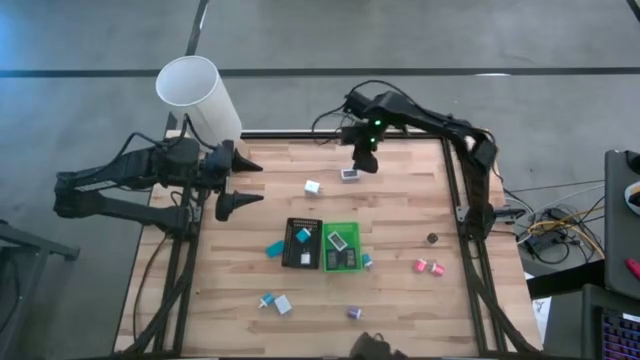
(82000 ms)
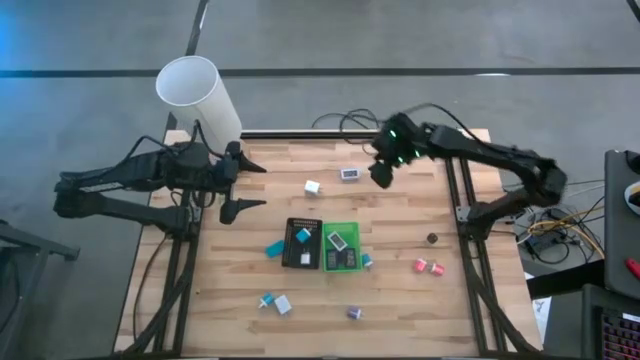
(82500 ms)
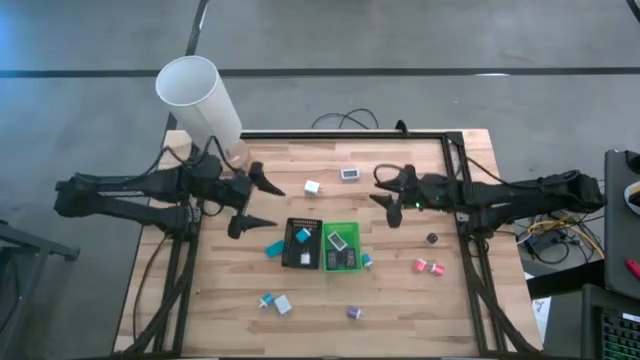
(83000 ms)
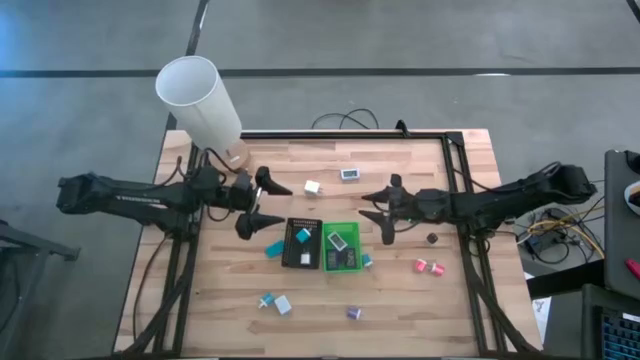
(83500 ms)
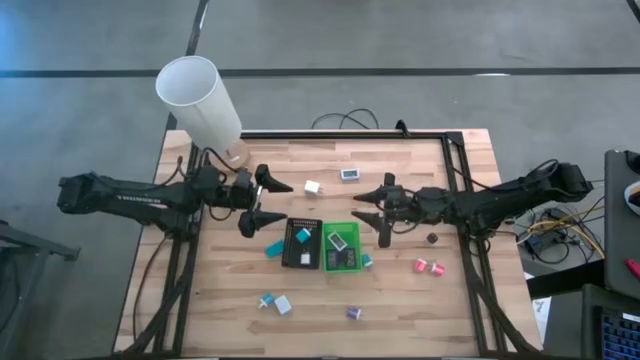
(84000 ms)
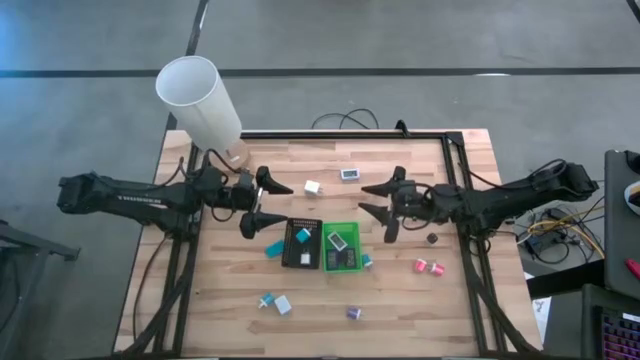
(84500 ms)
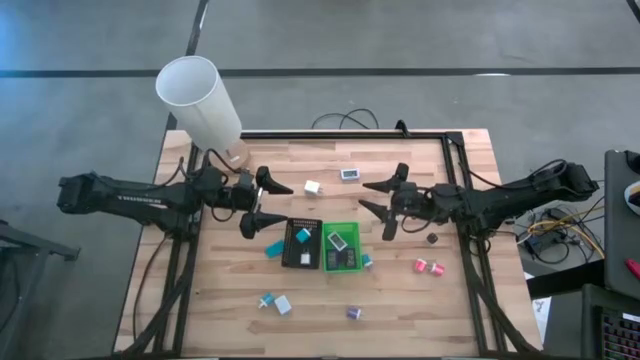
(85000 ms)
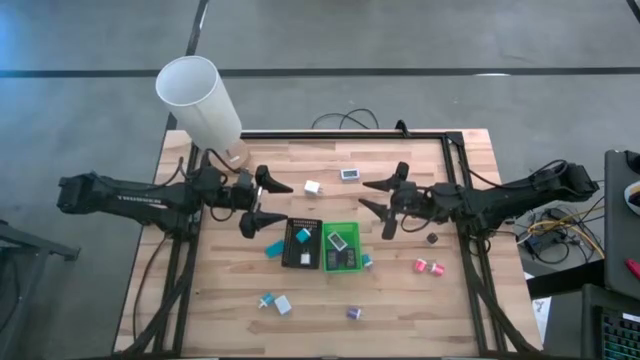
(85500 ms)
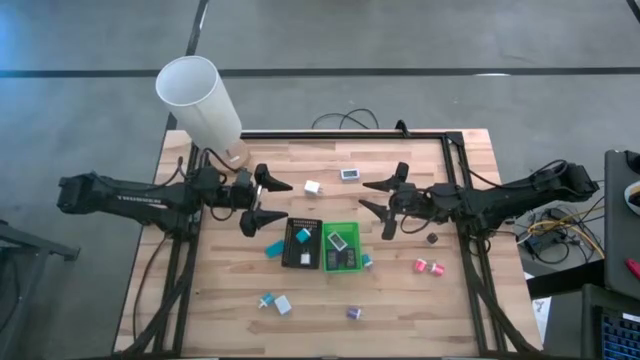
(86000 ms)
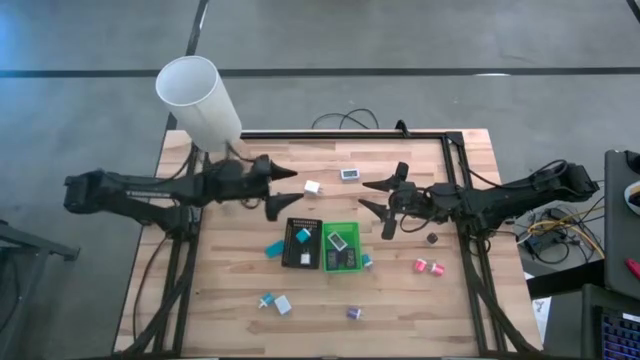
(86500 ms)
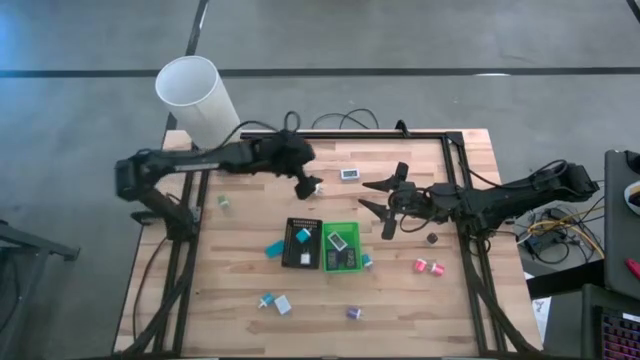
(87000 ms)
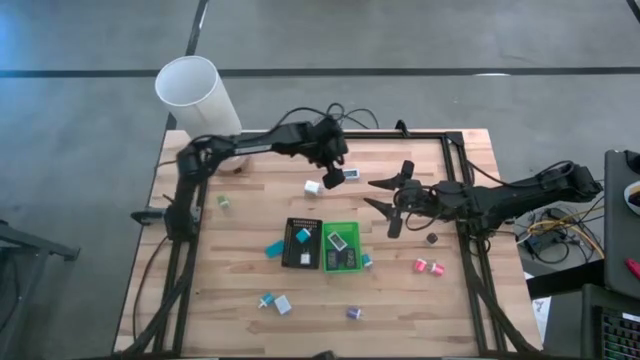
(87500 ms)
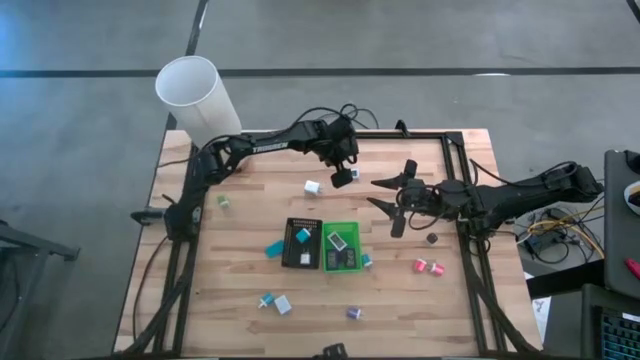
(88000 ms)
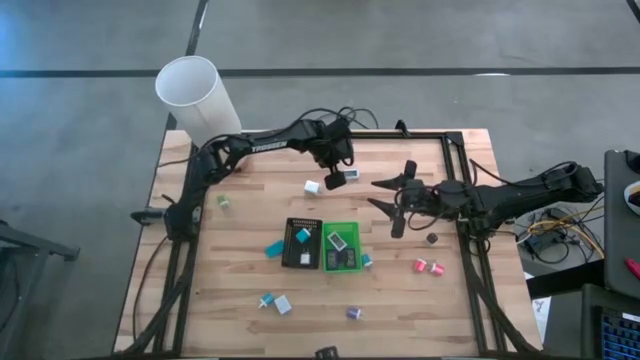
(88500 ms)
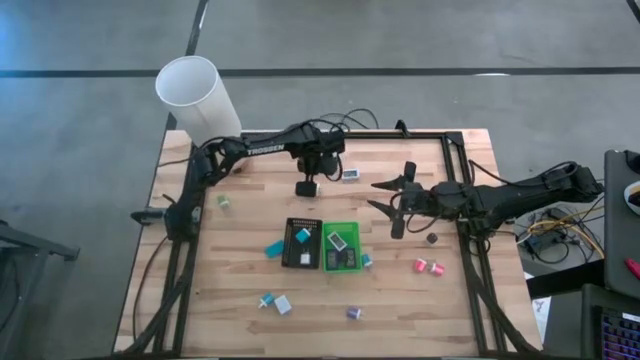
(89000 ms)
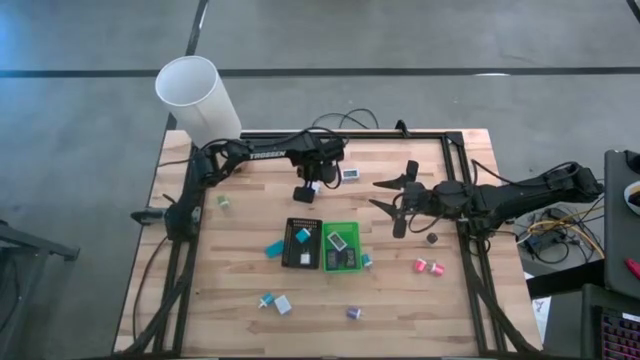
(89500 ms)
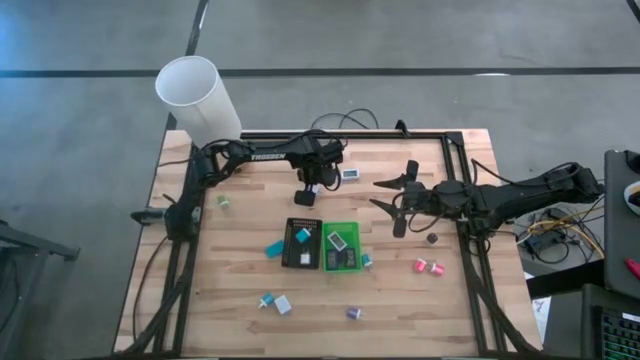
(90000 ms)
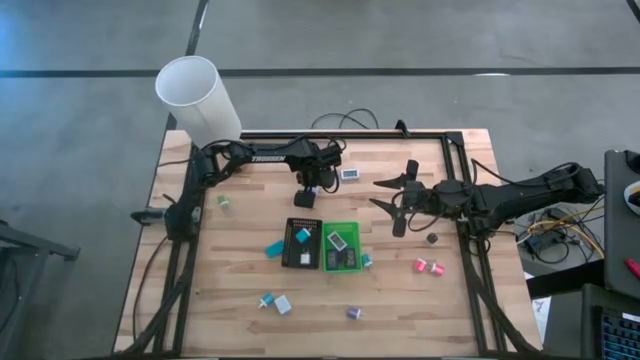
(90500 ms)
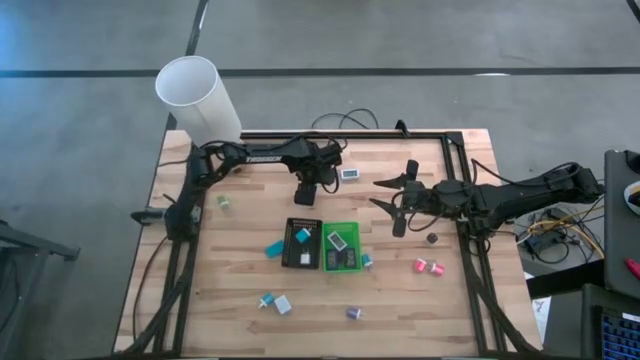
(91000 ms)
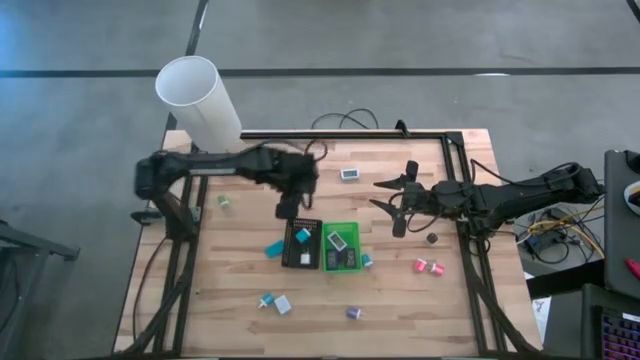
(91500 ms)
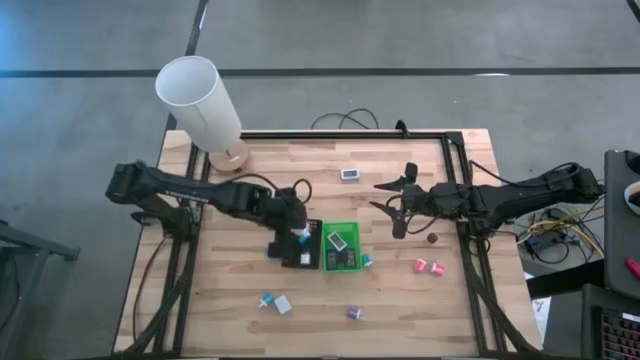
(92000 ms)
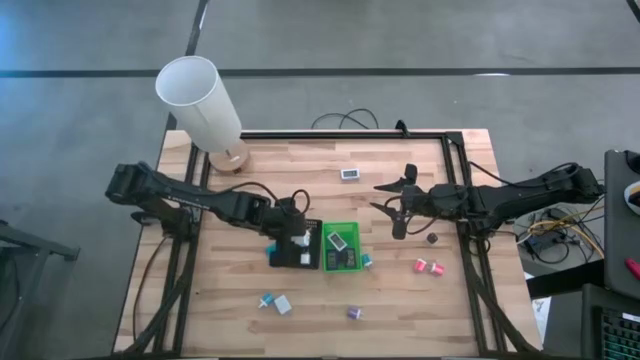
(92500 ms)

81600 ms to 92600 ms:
Task: Pick & Place Office items
Put the white charger adapter into the black bin

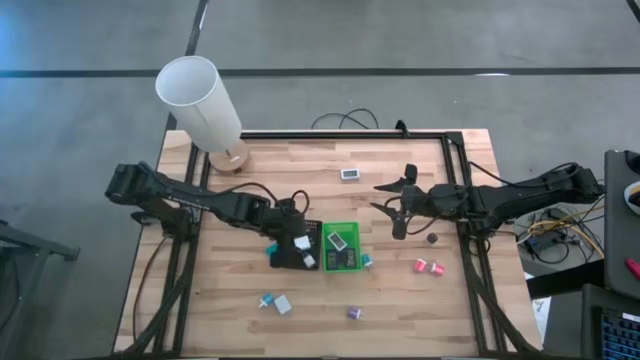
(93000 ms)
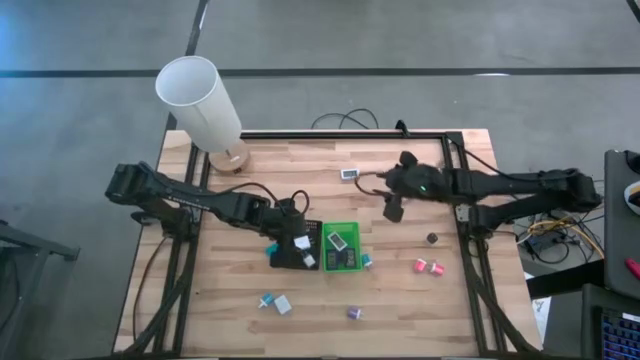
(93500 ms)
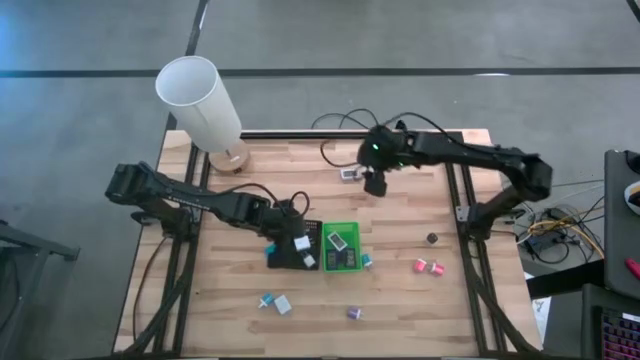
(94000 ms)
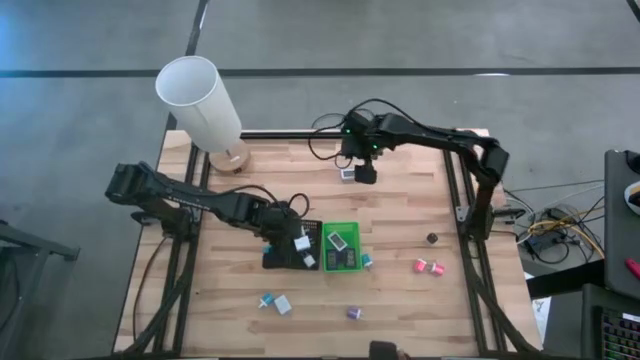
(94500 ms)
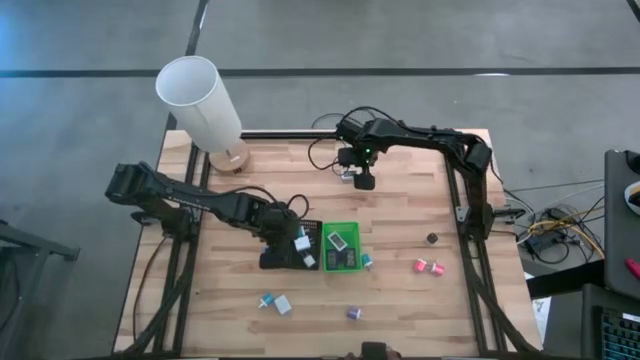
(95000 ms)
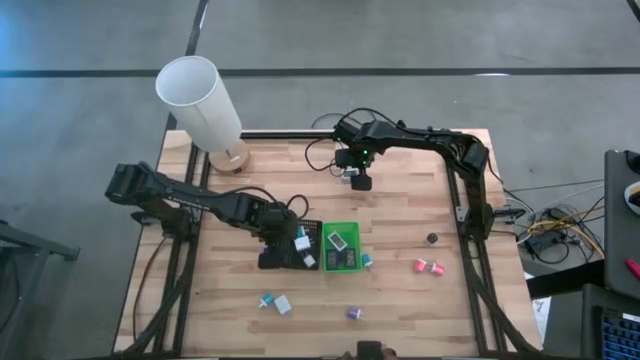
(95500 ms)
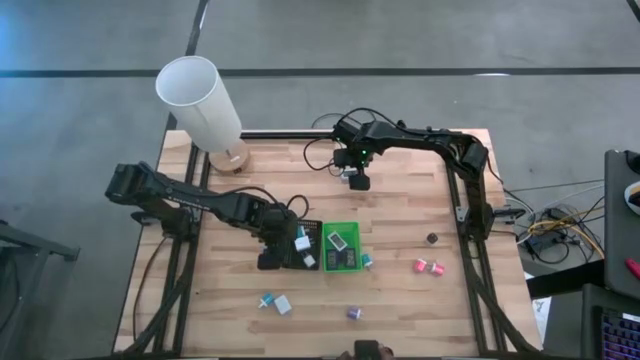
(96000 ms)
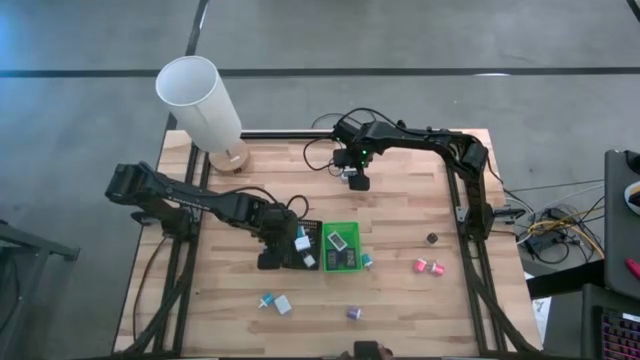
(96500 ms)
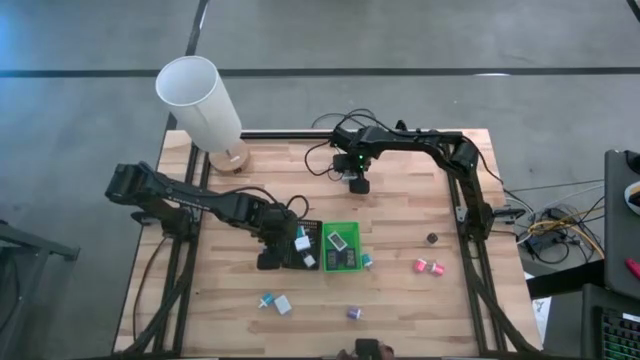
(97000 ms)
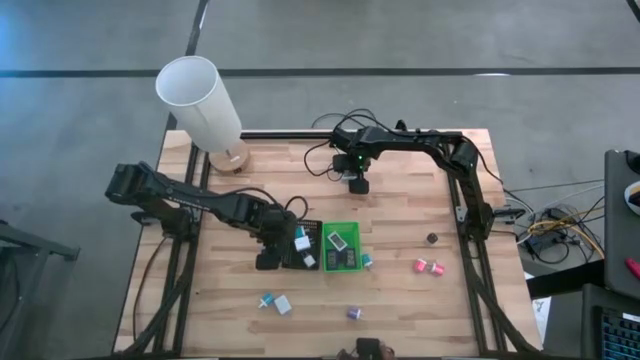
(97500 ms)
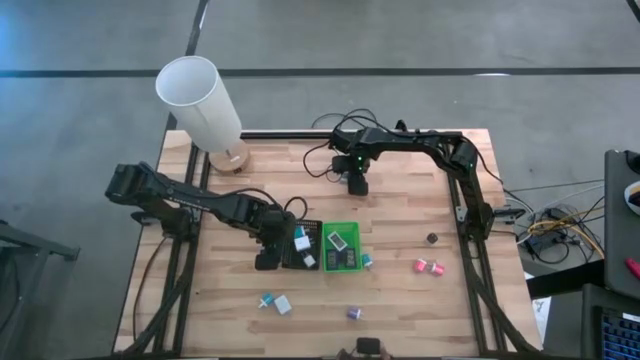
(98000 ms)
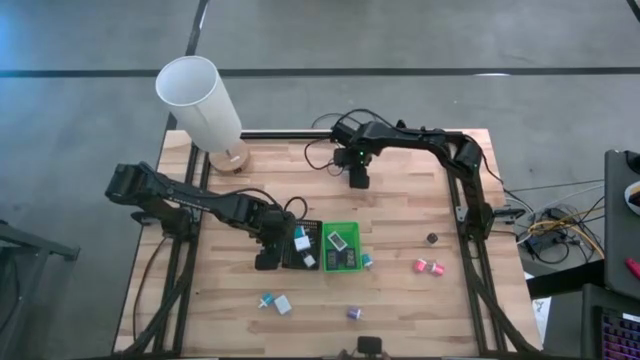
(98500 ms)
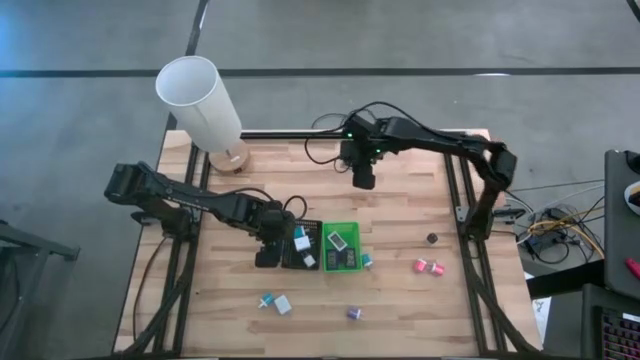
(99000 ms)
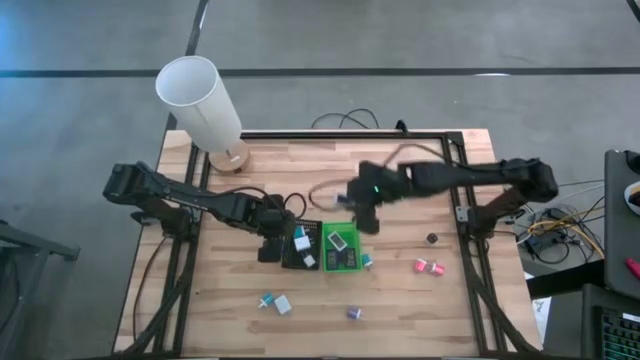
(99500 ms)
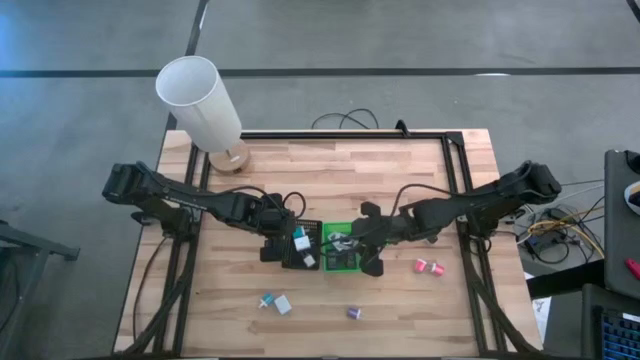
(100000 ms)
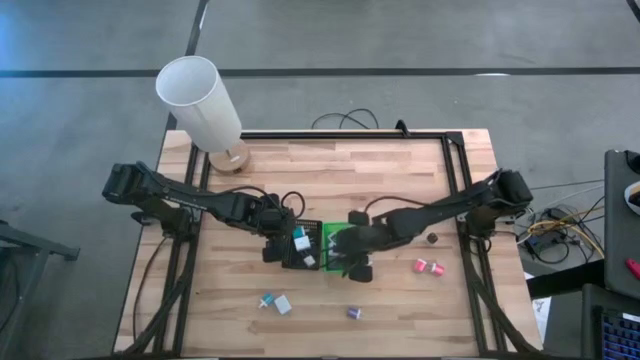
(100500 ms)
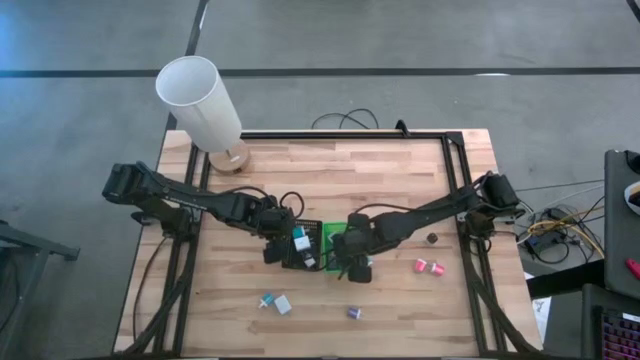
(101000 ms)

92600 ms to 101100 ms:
Put the white timer into the green bin

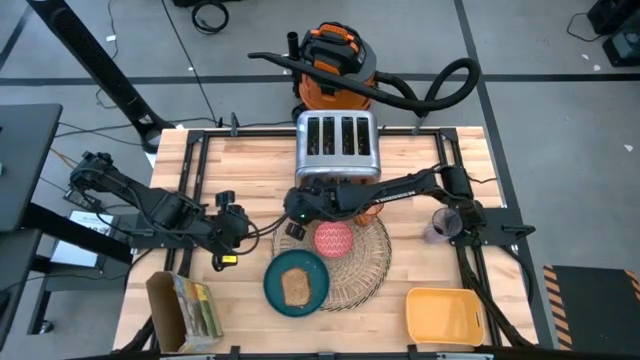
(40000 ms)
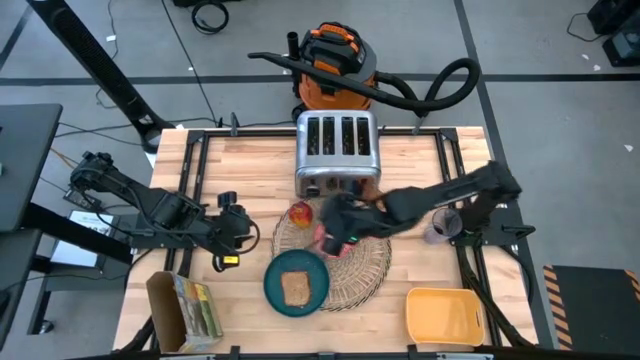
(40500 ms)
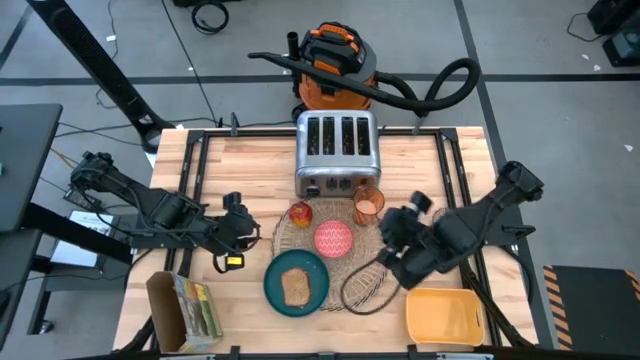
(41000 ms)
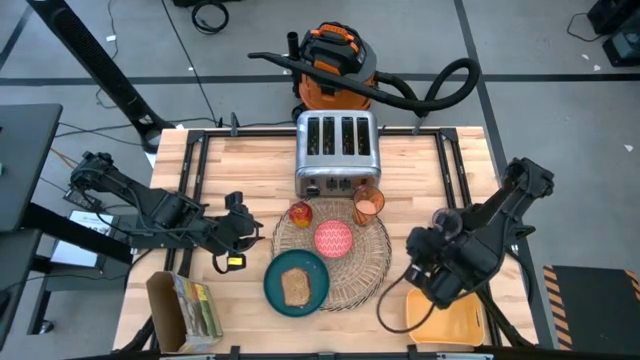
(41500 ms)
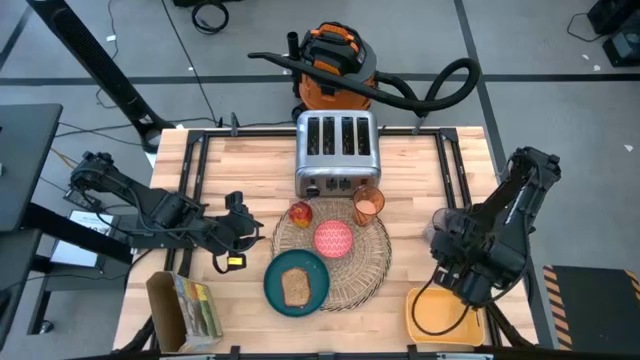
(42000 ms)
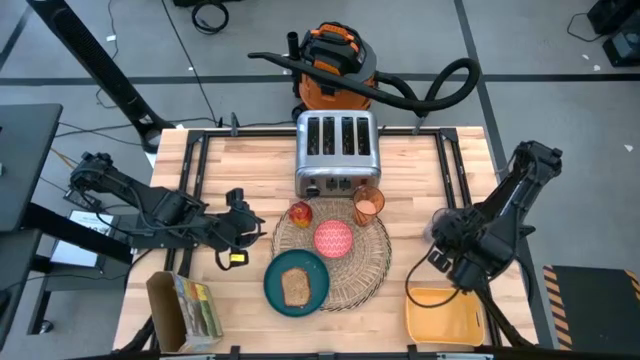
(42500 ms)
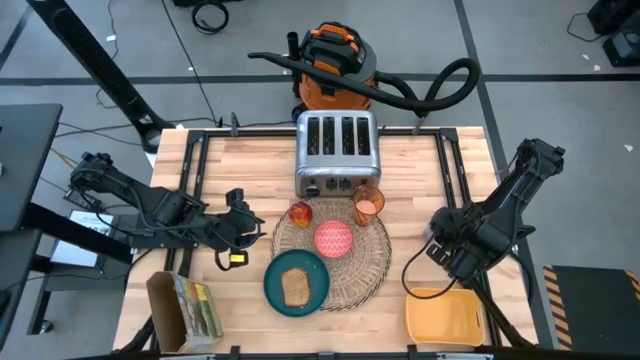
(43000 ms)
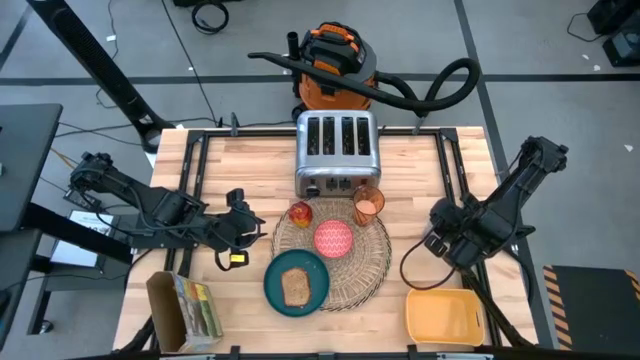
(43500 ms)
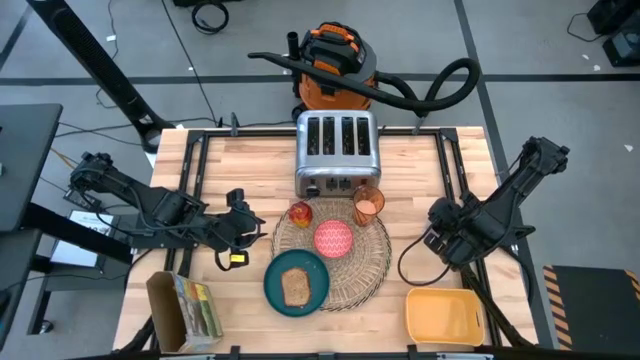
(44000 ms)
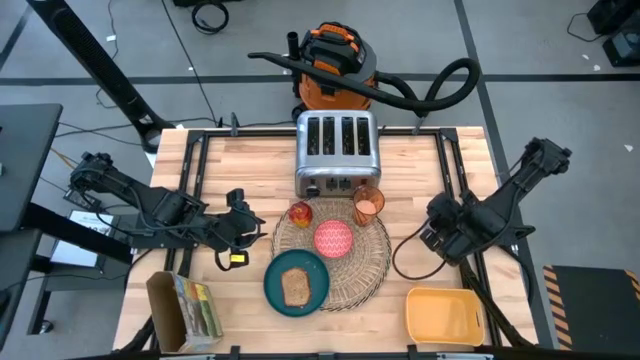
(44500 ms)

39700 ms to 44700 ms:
Task: Arrange a breakfast setting
Put the blue spoon on the brown placemat to the right of the red patterned bowl
